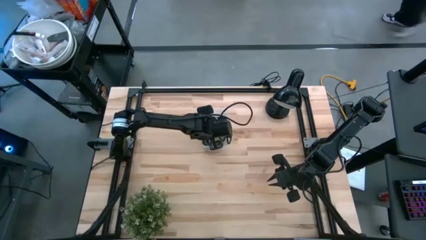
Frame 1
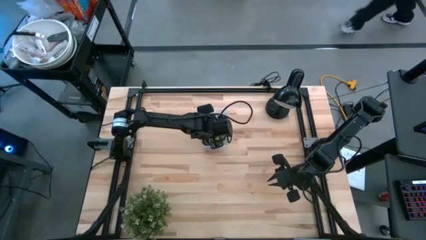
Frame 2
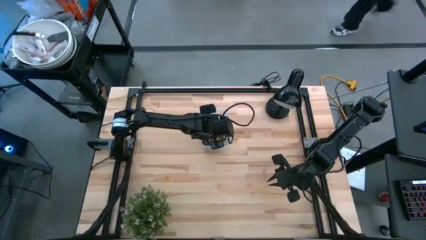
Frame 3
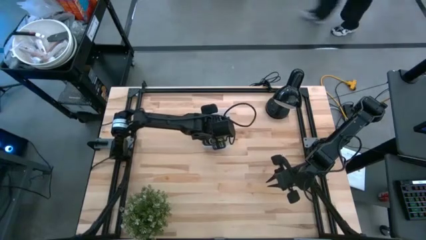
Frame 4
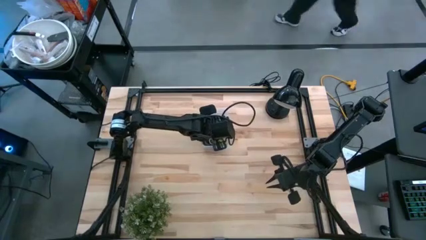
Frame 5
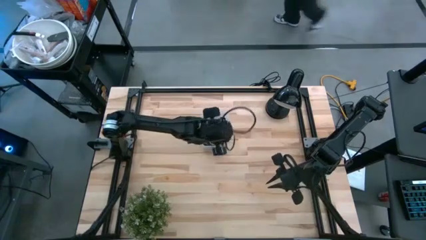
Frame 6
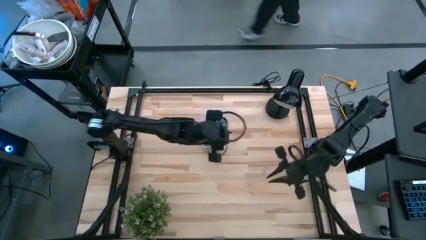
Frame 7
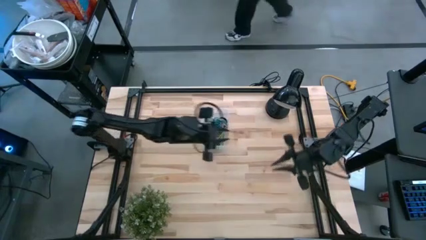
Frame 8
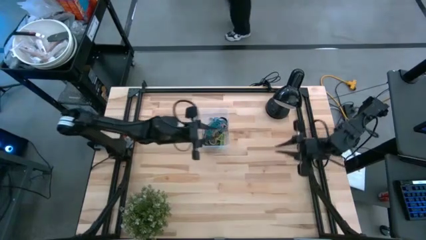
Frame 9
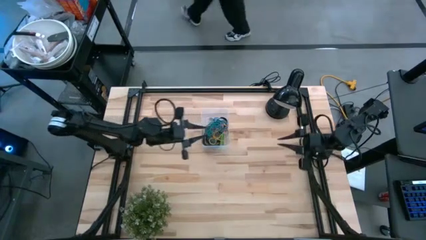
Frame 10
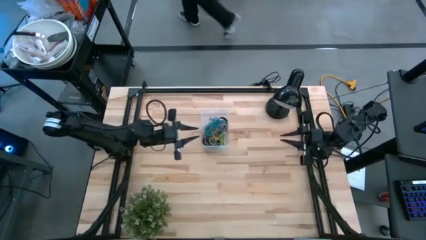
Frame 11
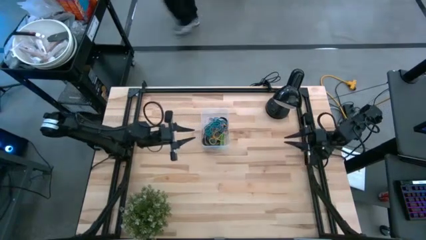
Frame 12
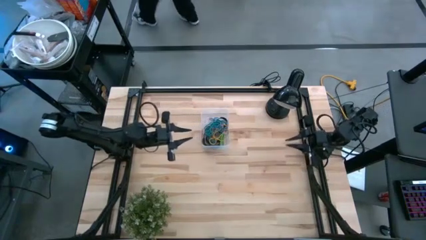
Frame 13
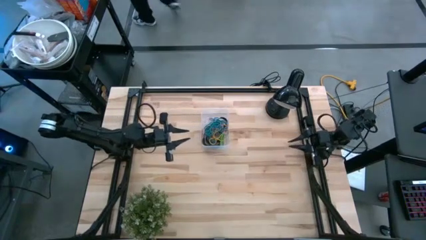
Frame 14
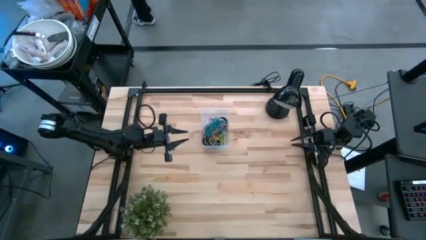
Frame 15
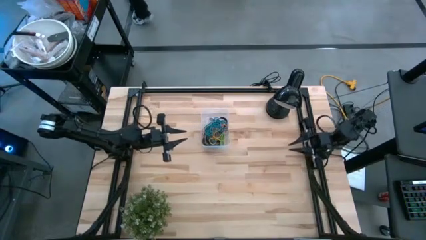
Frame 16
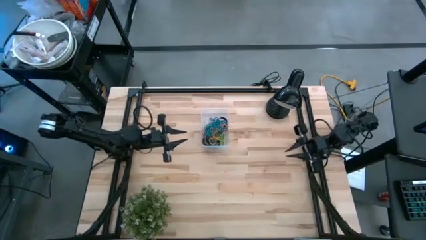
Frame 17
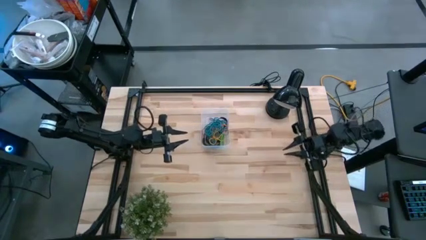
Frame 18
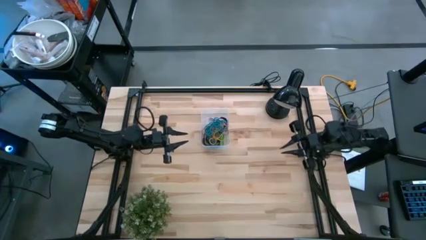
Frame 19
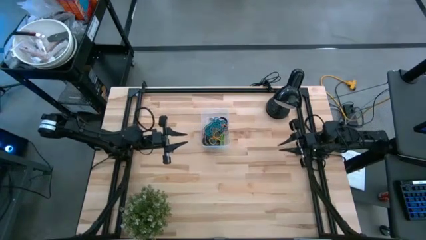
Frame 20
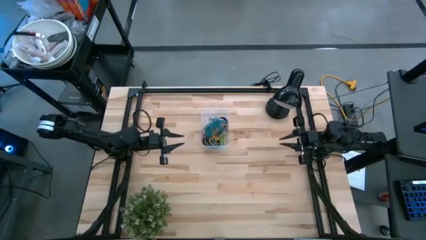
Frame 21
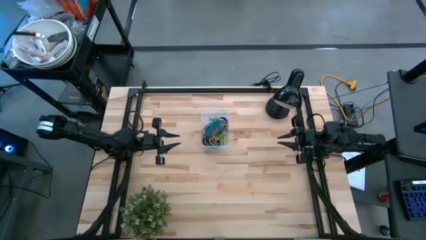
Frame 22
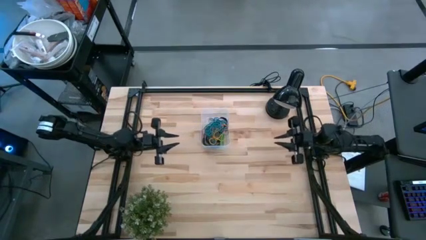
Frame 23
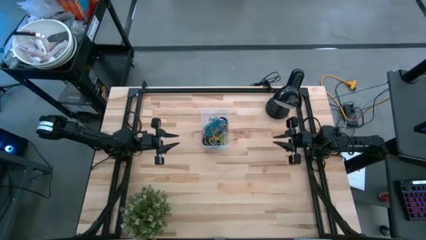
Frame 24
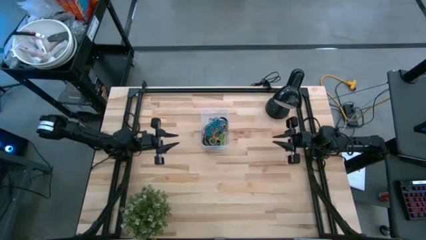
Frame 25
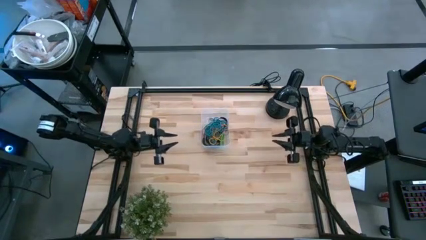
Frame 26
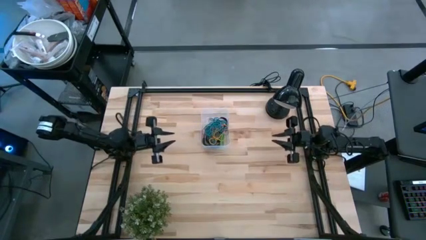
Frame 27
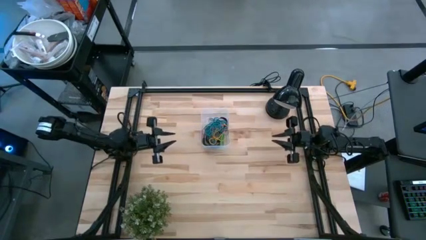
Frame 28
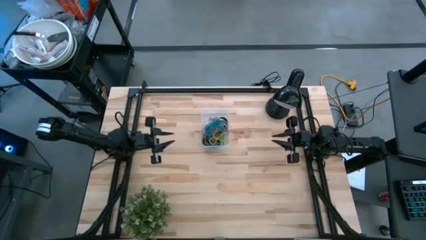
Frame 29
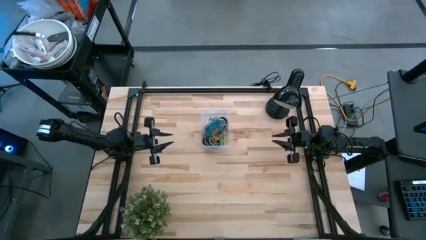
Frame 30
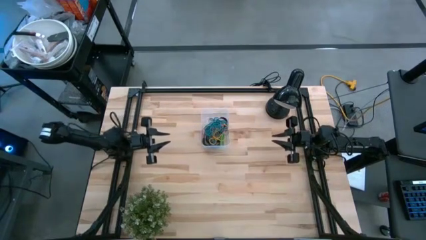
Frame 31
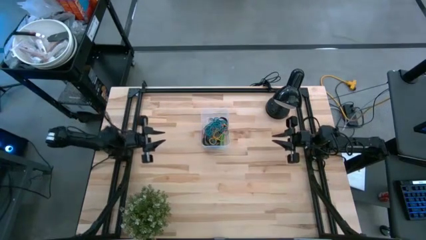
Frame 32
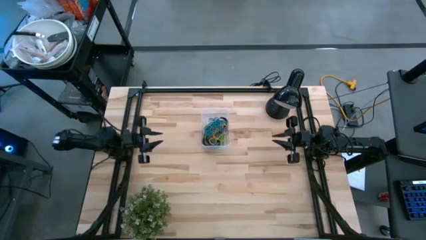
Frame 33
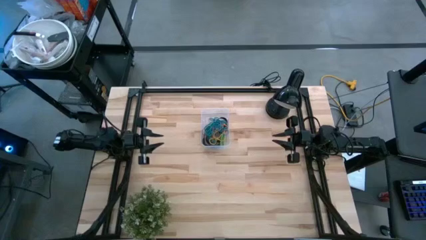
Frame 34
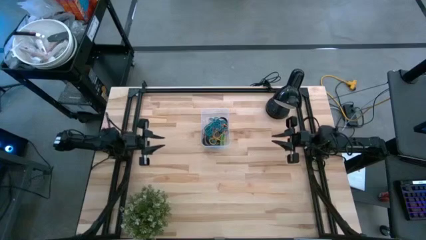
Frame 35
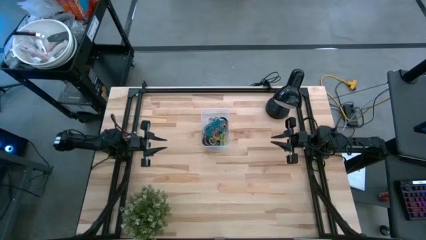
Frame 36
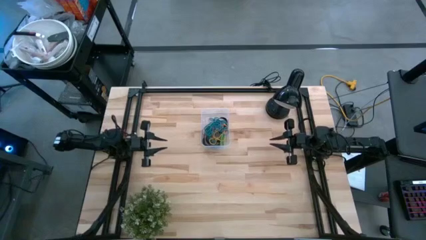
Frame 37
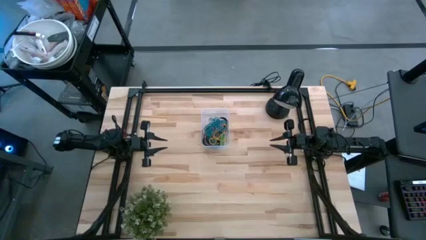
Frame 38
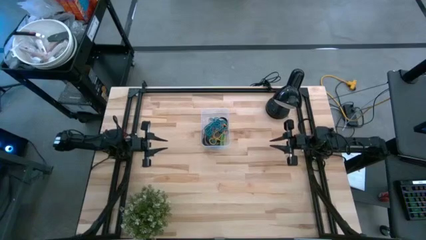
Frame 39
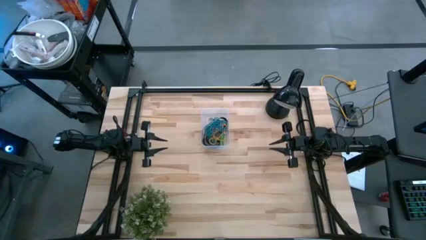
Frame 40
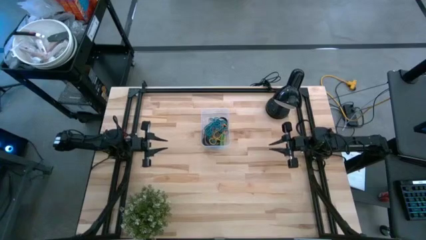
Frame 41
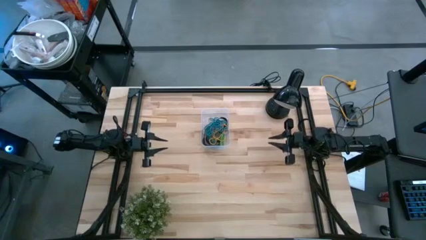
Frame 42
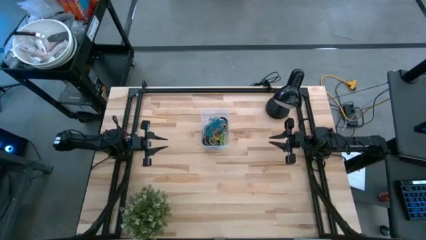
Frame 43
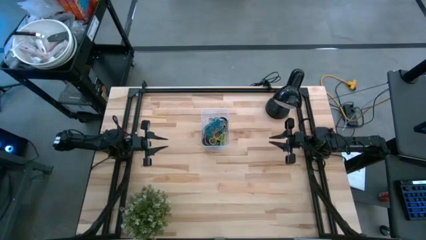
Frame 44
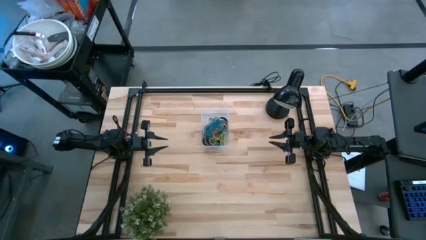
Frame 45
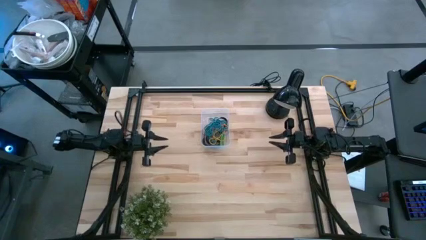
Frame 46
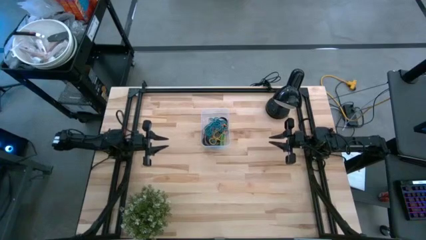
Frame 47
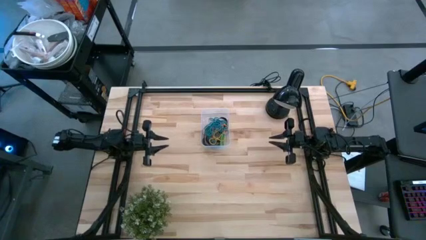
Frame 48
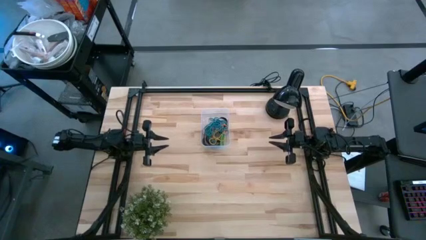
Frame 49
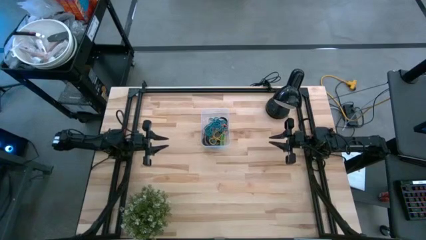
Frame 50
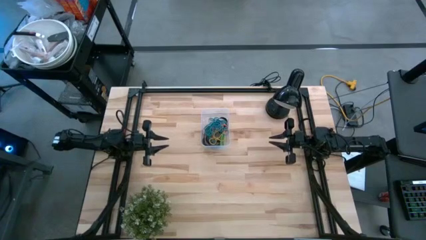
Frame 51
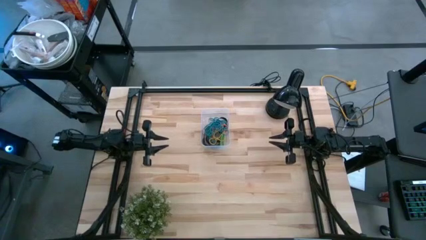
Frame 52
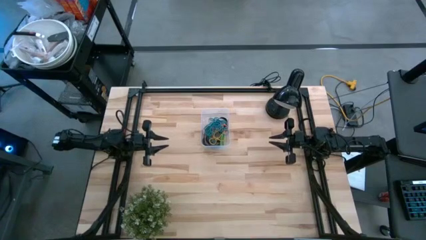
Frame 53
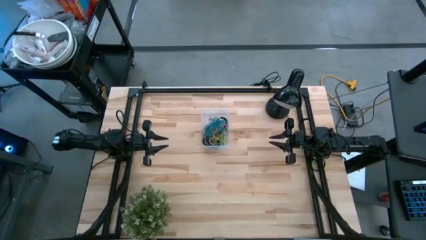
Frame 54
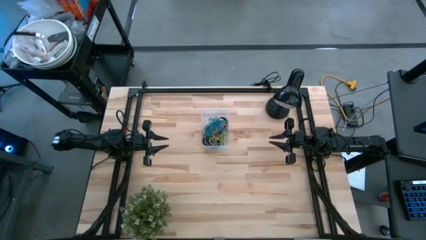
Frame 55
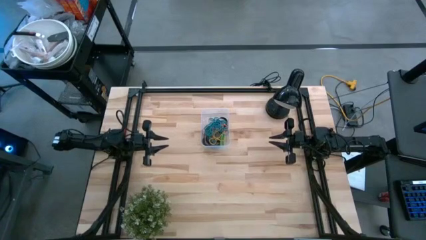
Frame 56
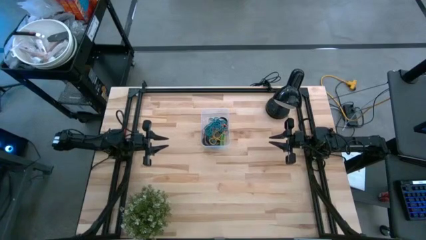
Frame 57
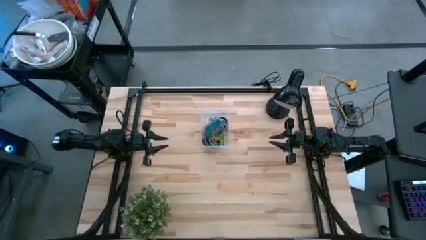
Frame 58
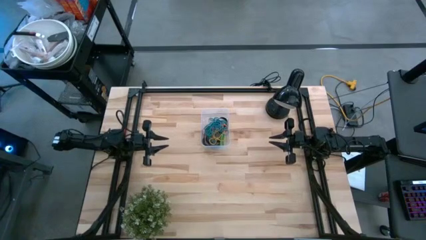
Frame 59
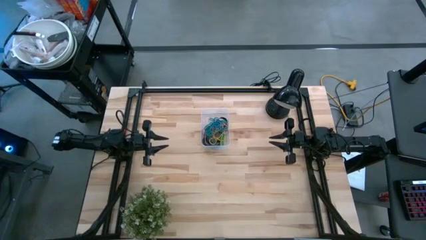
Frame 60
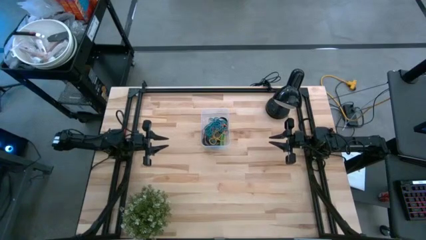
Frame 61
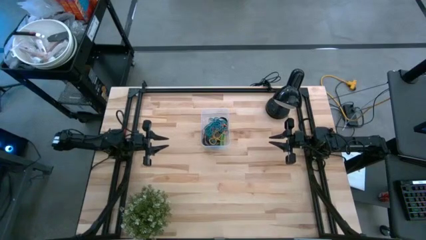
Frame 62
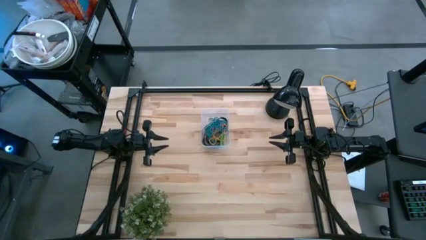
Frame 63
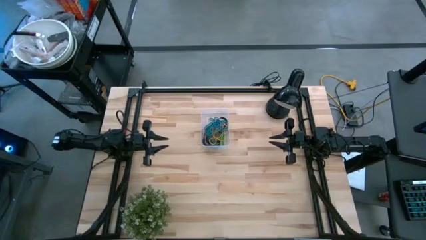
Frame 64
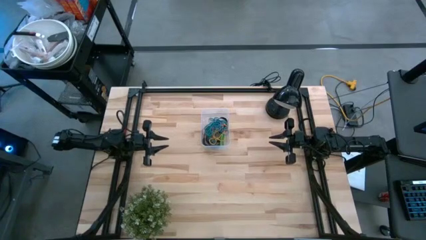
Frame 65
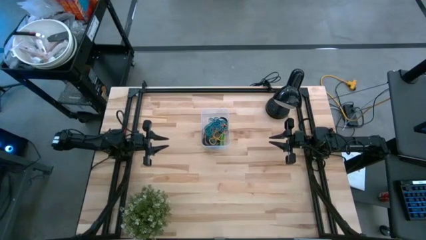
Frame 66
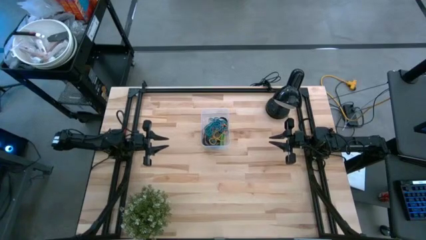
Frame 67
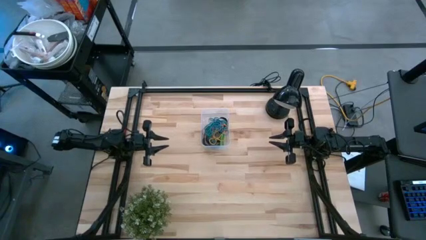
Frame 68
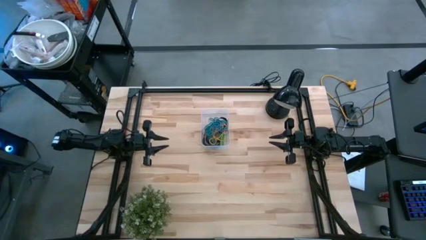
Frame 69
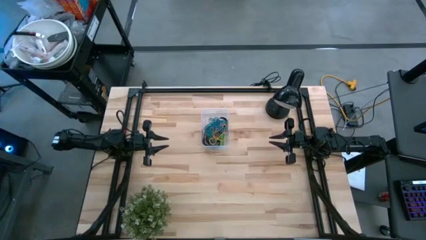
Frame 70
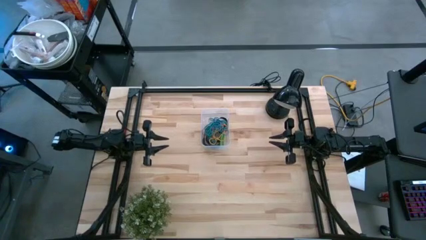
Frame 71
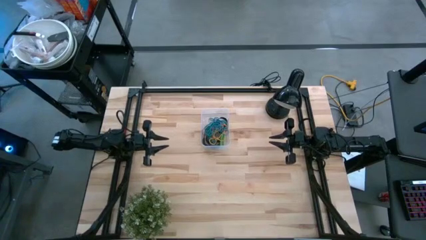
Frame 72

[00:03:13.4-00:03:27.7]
Task: Pick and place rubber bands into bin
Return to Home Position
